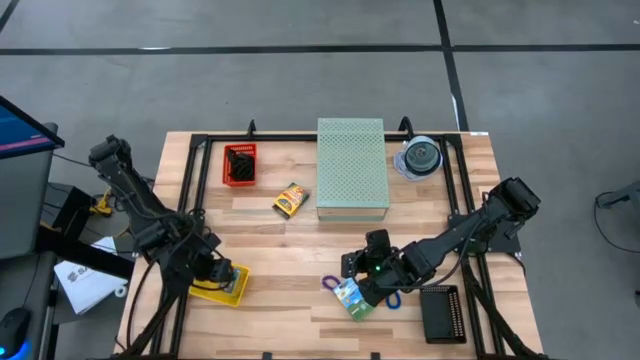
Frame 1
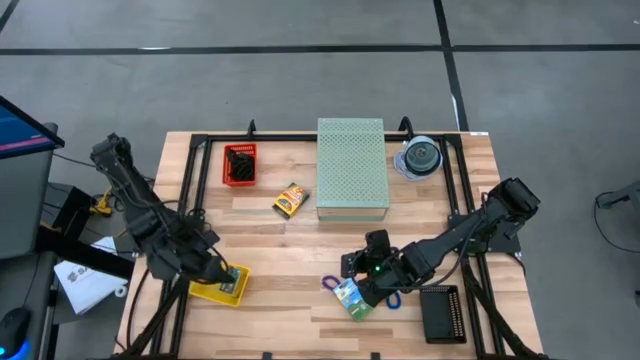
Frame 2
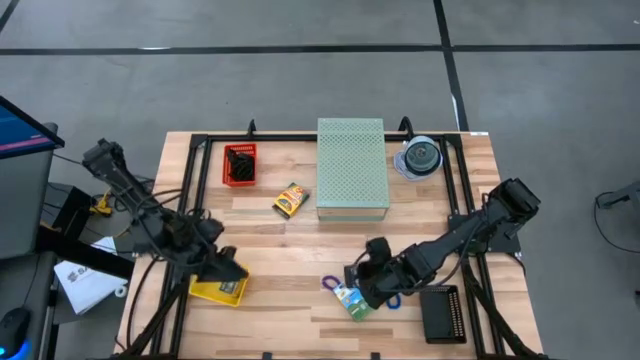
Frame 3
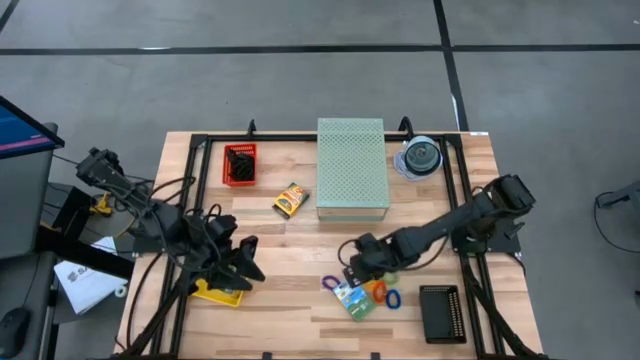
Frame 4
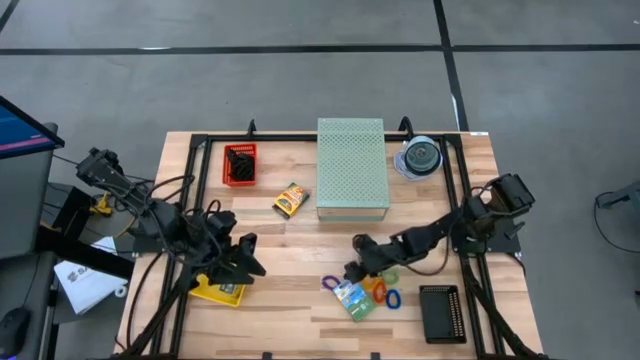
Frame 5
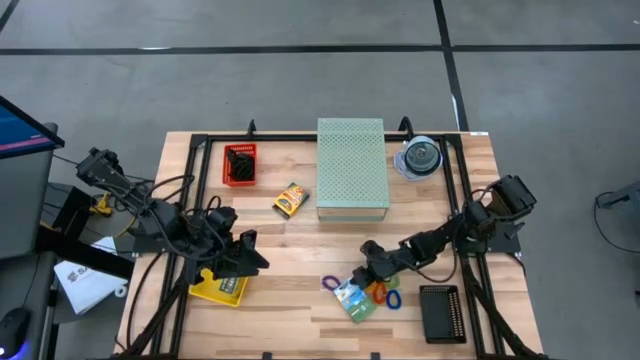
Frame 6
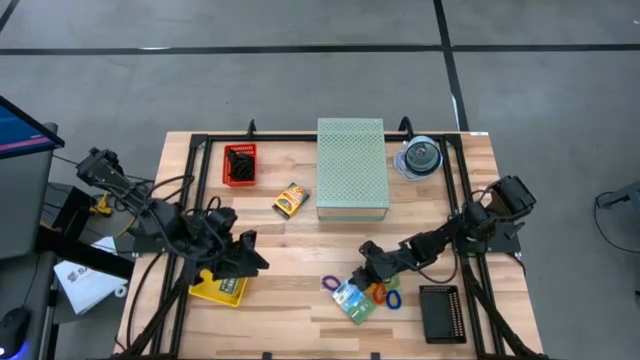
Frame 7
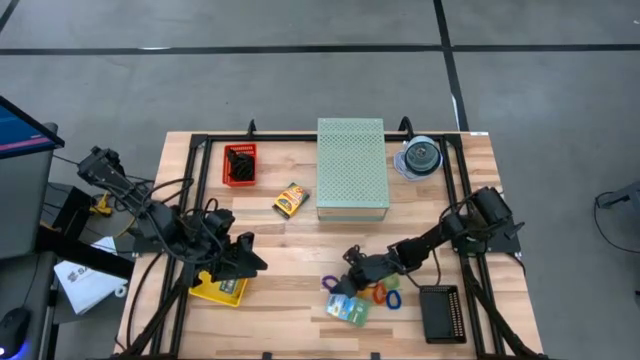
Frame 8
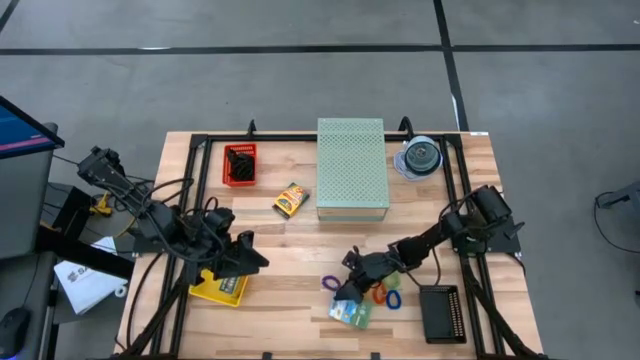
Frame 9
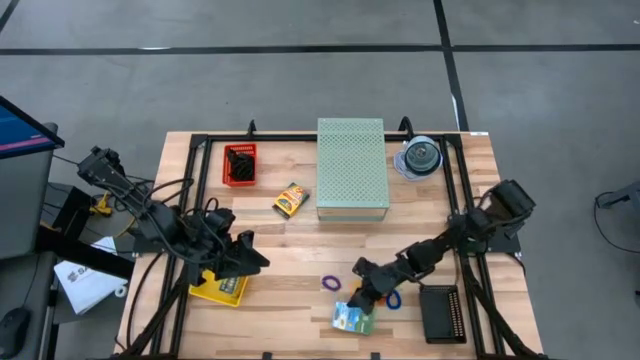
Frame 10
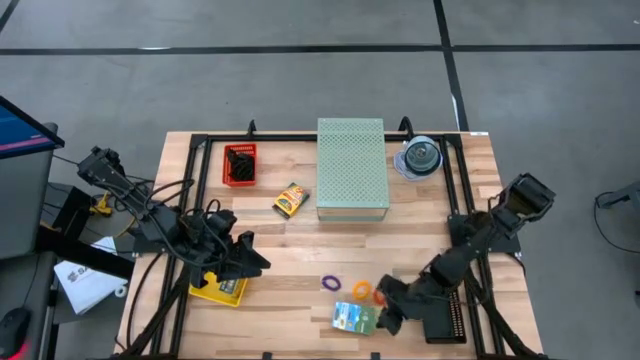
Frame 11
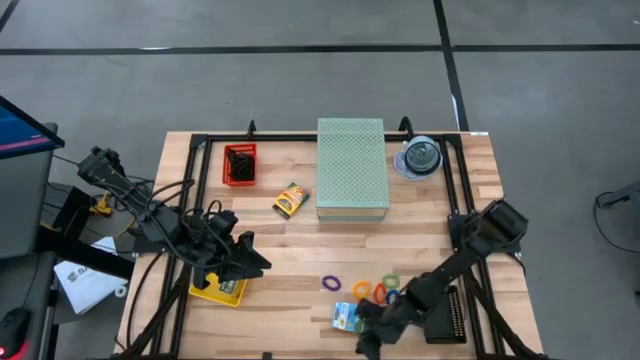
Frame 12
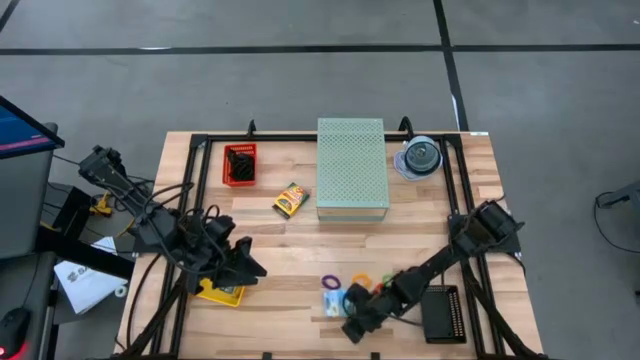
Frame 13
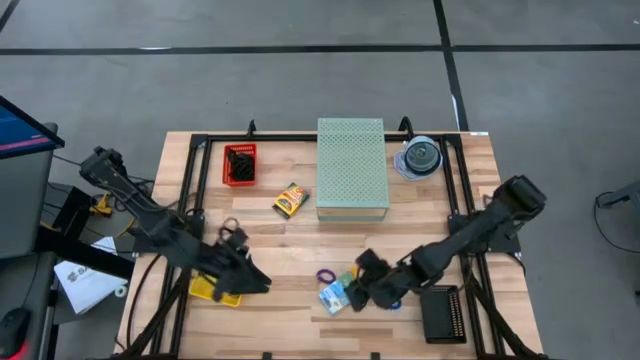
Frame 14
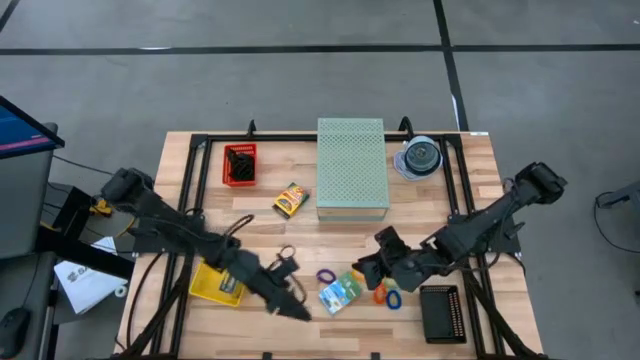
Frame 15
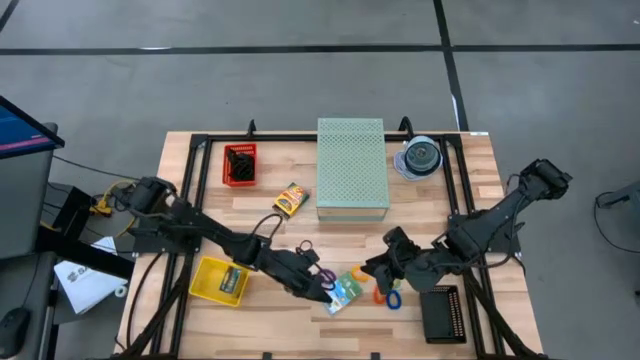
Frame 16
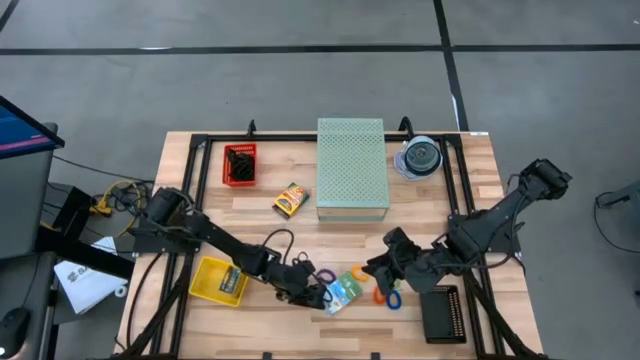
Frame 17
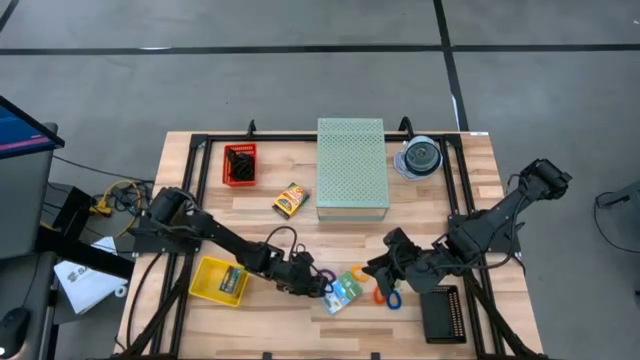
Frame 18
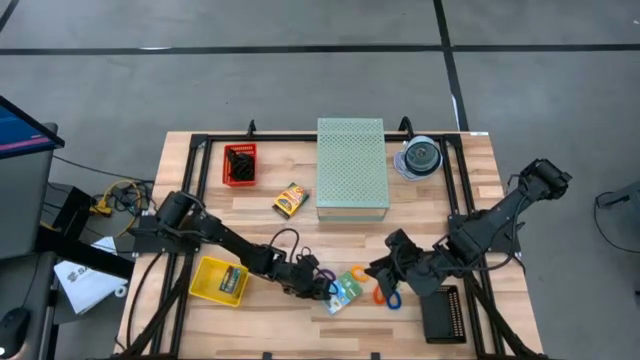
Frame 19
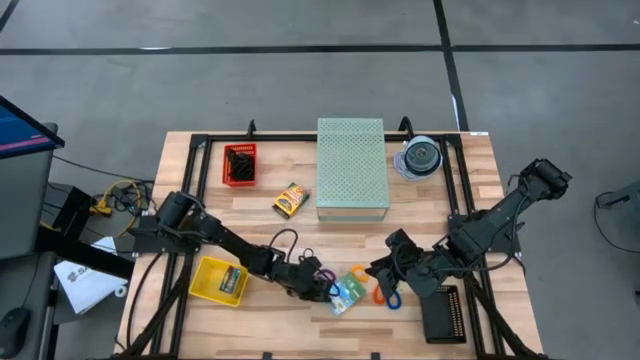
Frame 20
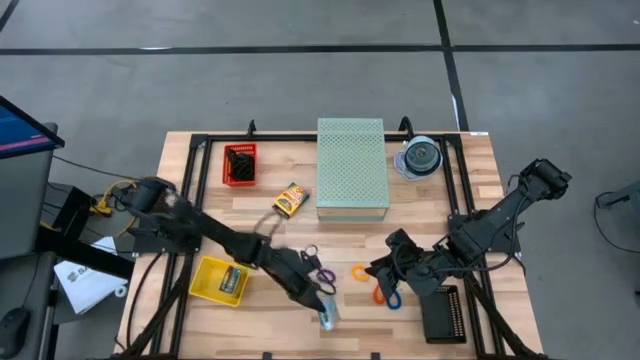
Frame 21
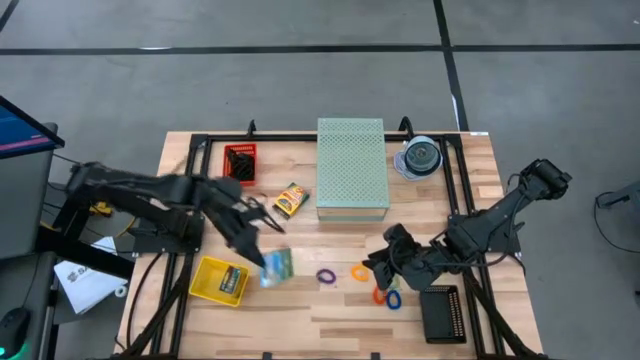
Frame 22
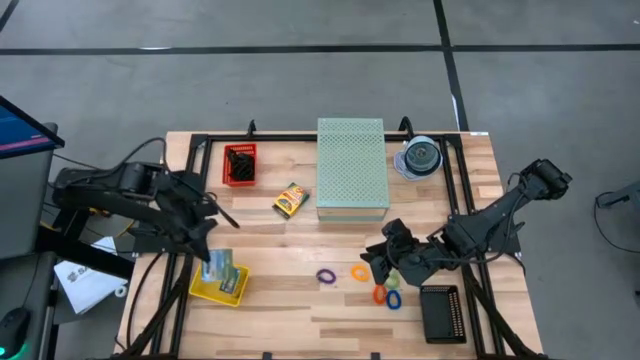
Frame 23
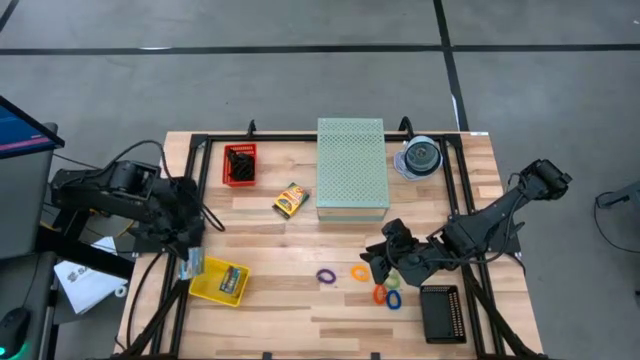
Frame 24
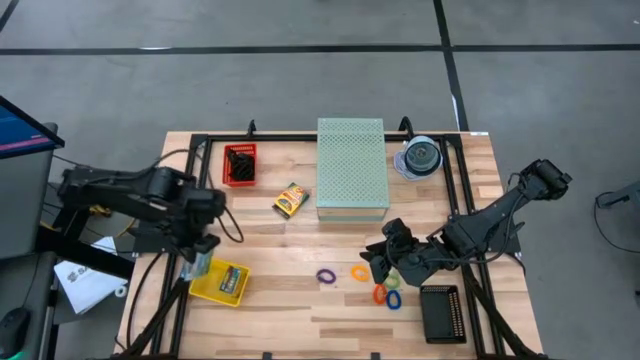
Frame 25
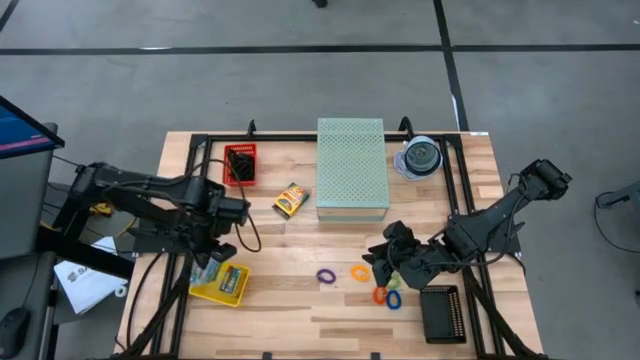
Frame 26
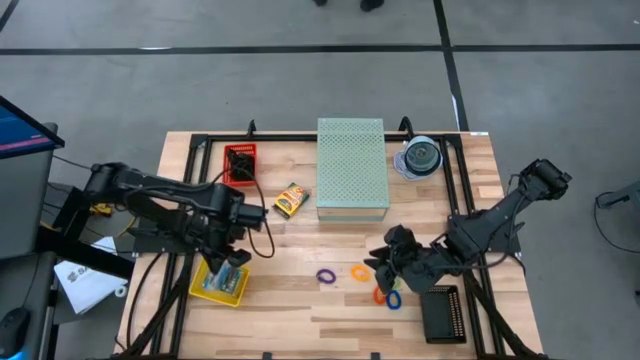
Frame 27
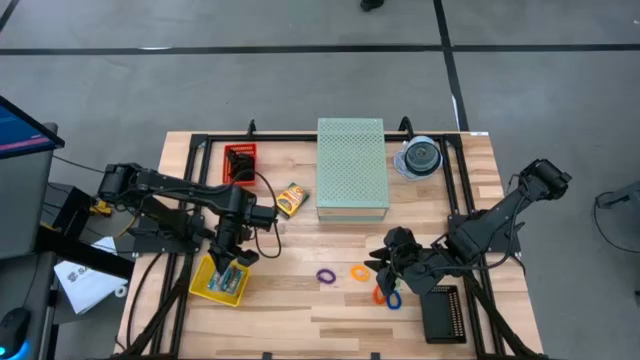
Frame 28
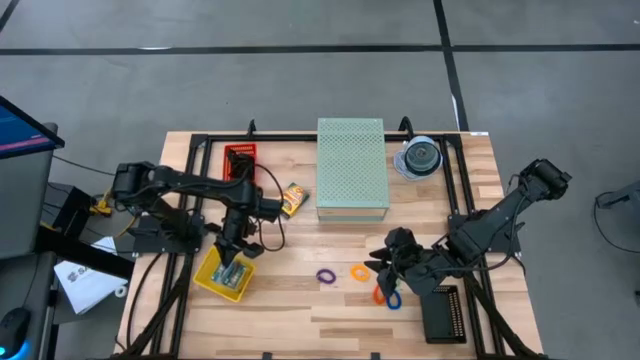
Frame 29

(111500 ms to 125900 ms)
Task: Pick & Place Office Desk Supplies
Put the crayon box into the yellow bin

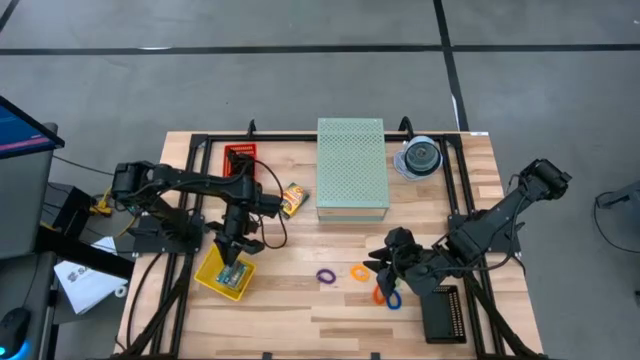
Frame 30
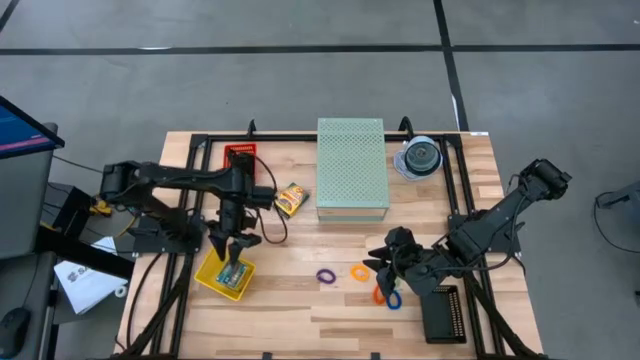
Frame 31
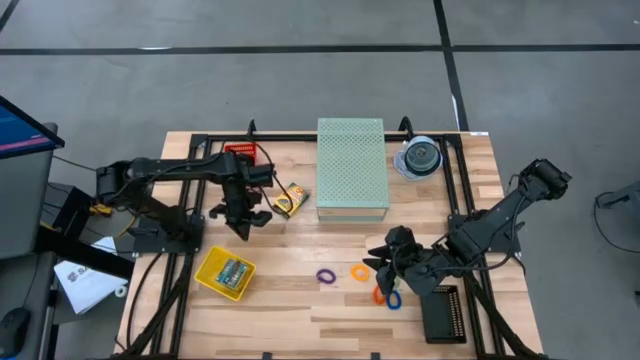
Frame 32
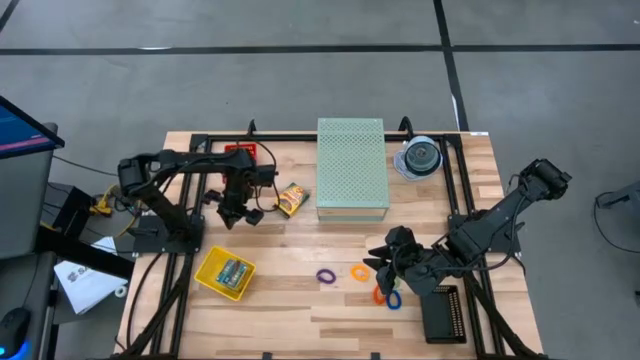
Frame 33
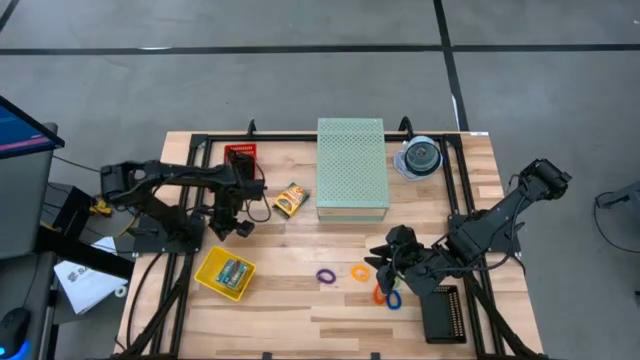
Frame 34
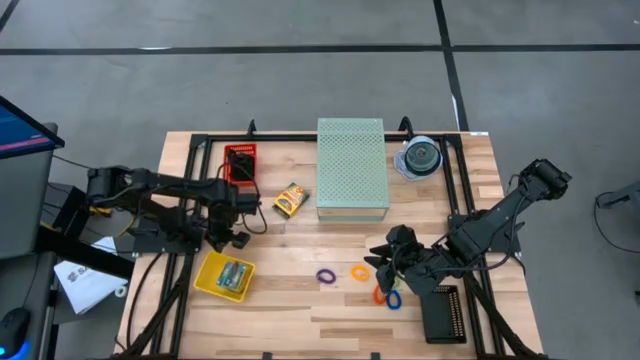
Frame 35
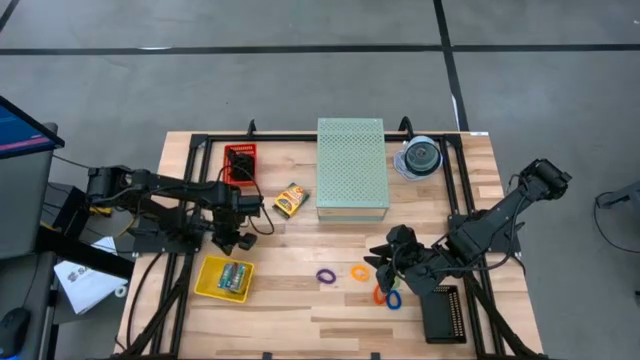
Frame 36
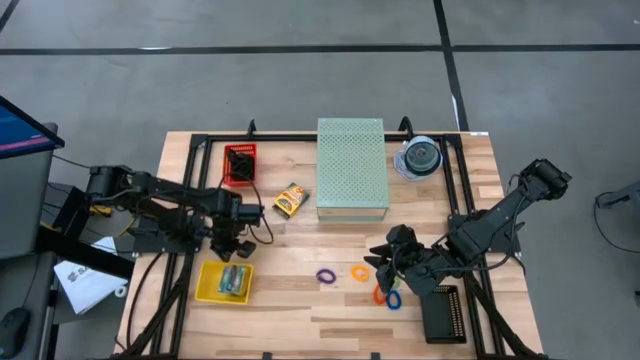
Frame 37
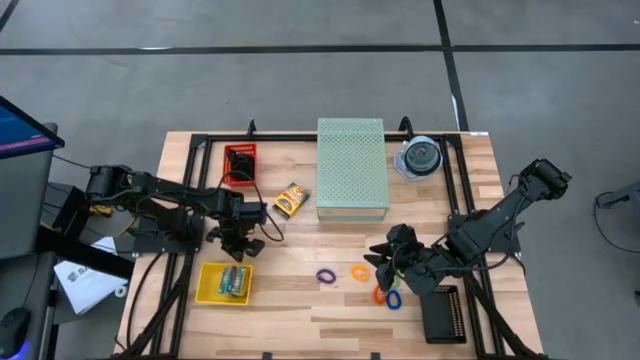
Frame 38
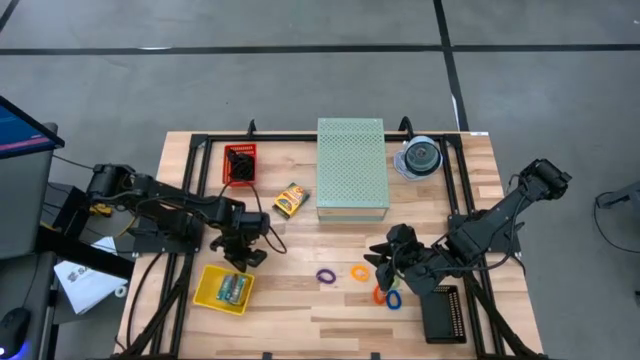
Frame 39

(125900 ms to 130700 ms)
Adjust the yellow bin

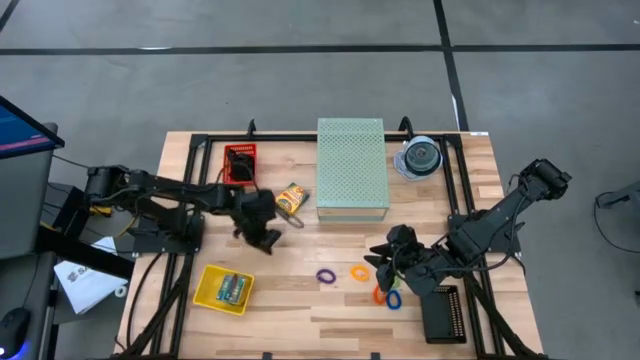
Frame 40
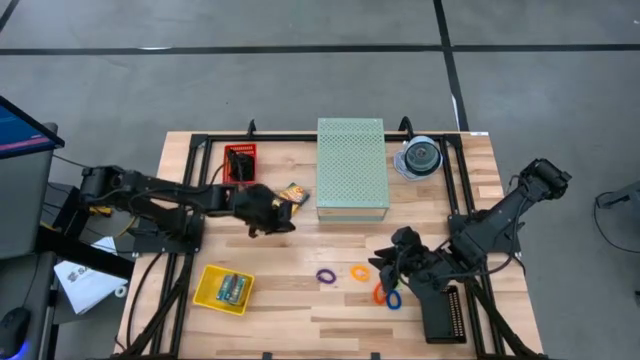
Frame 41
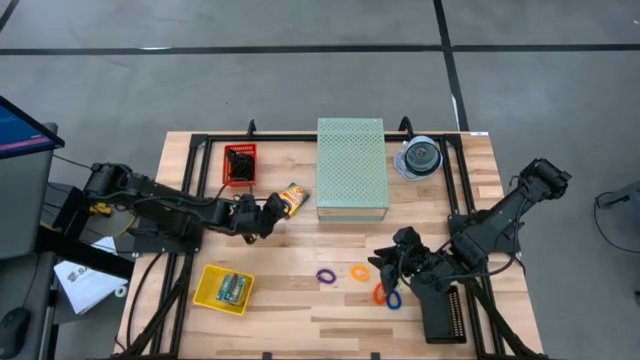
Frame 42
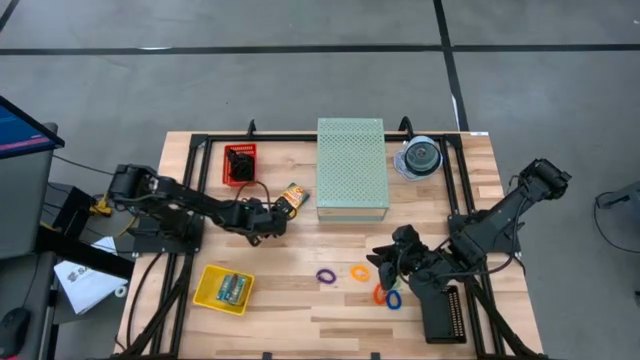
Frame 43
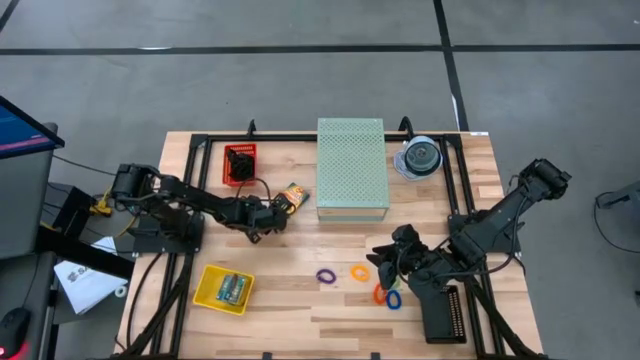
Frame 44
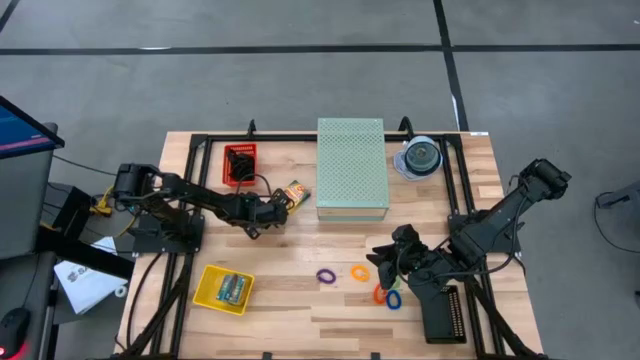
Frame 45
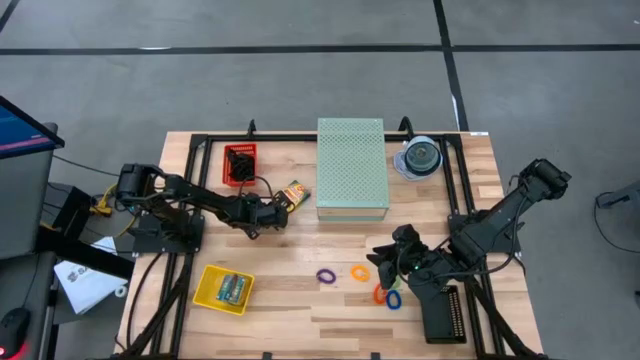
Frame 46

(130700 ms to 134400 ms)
Put the crayon box into the yellow bin
